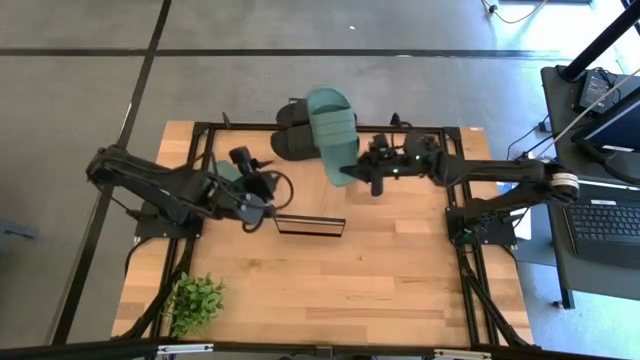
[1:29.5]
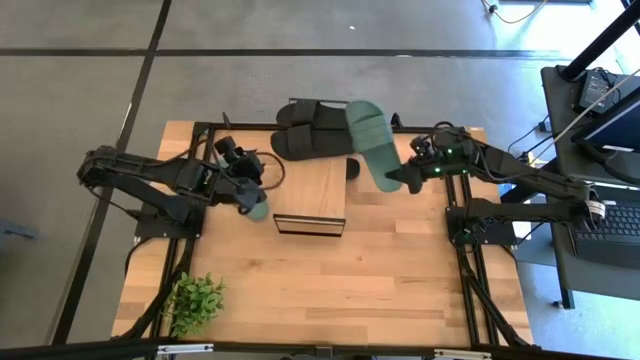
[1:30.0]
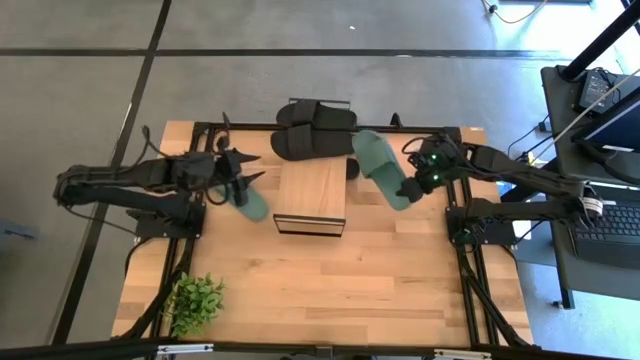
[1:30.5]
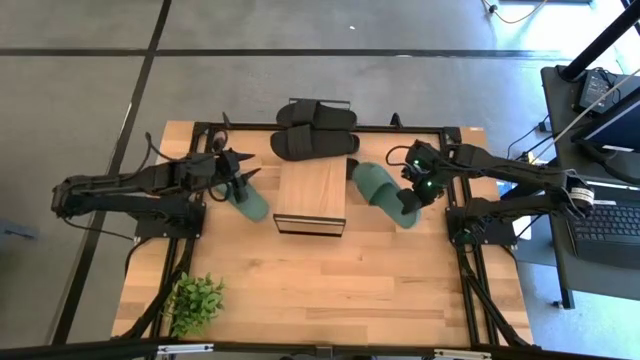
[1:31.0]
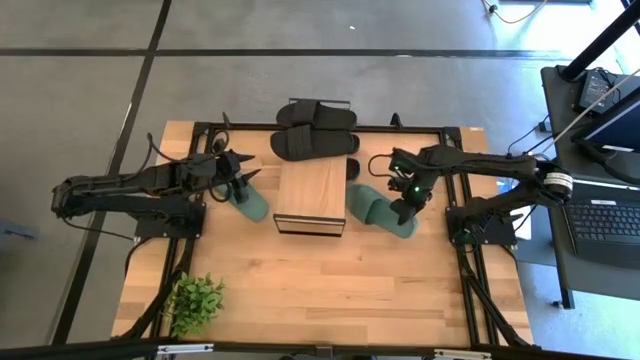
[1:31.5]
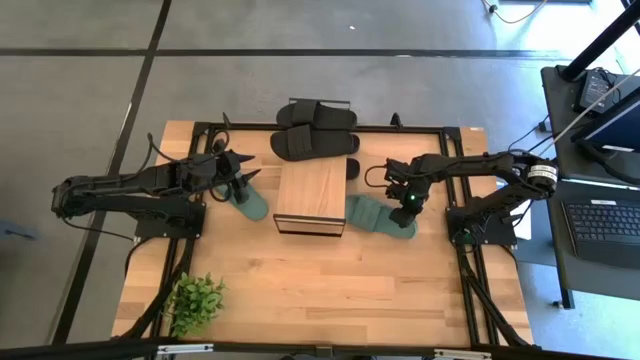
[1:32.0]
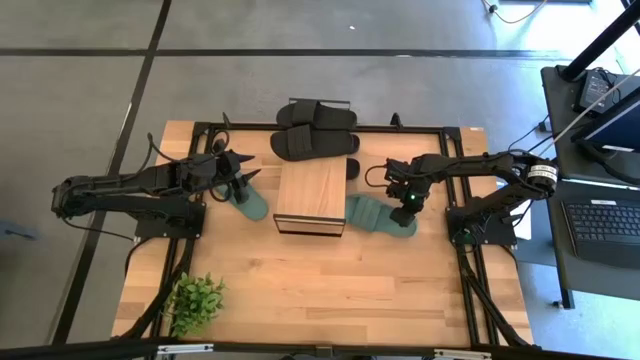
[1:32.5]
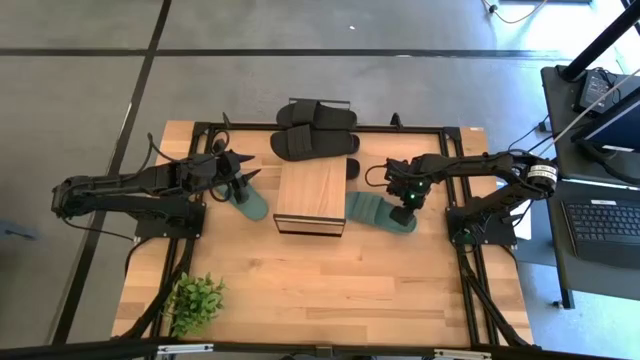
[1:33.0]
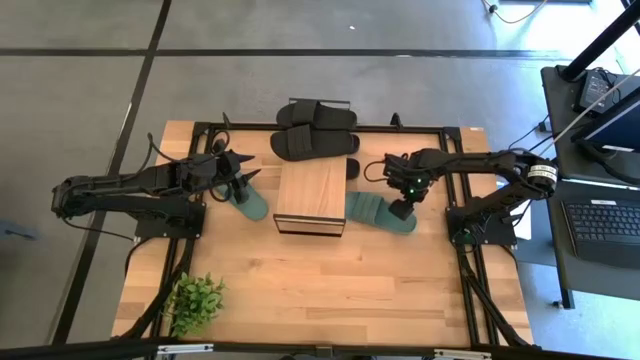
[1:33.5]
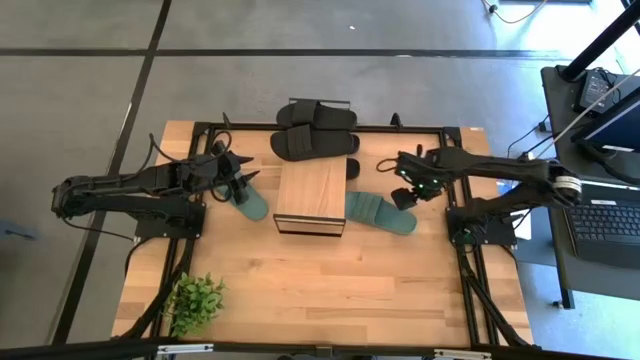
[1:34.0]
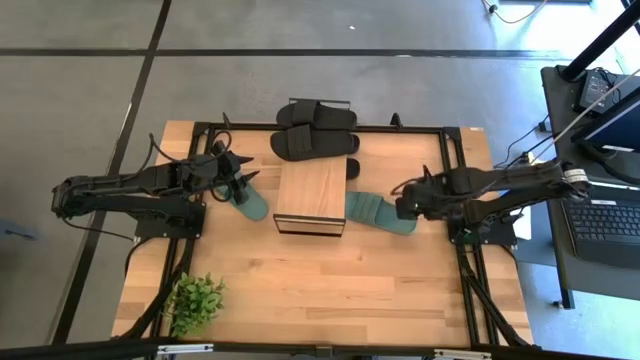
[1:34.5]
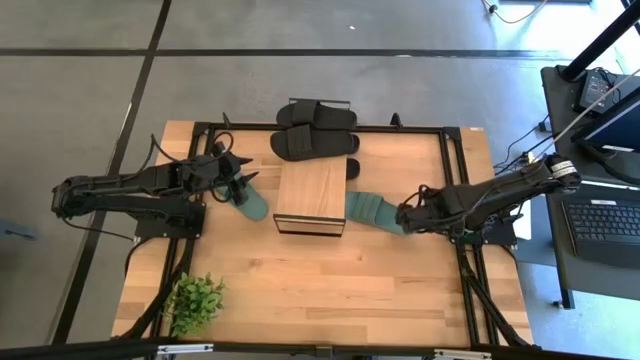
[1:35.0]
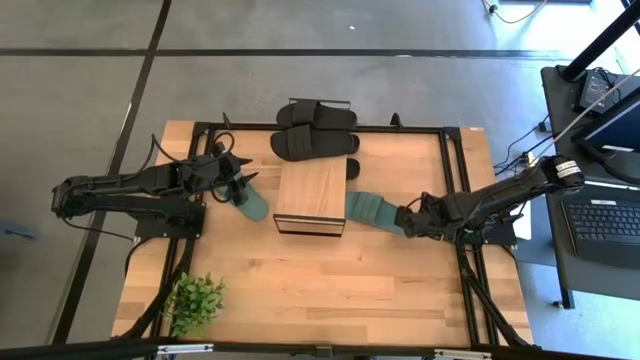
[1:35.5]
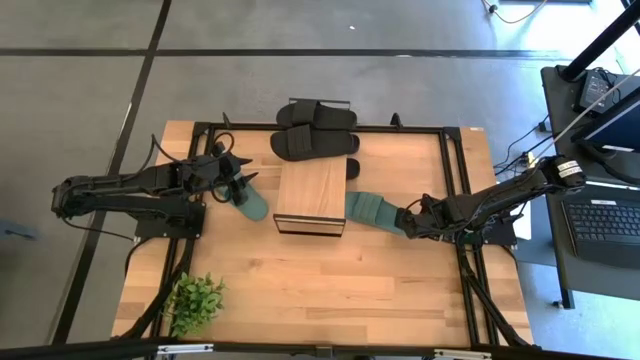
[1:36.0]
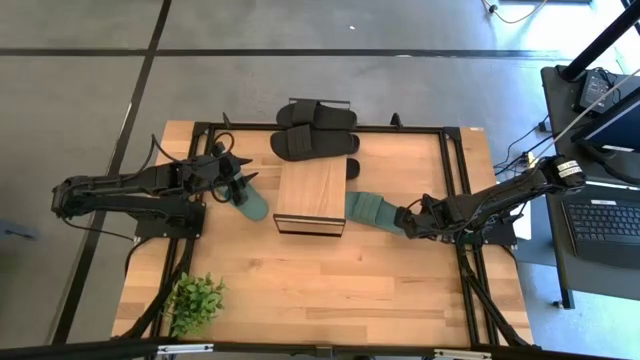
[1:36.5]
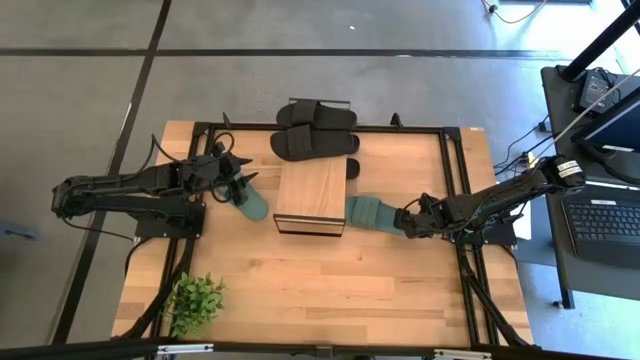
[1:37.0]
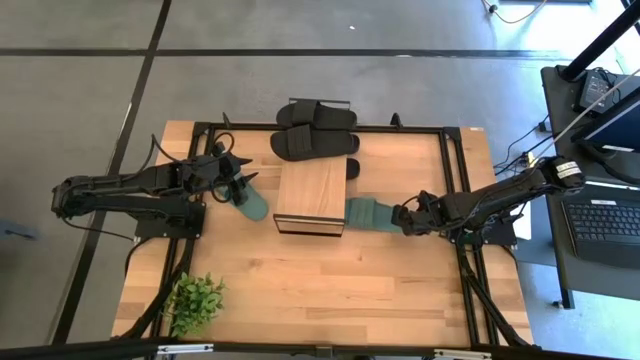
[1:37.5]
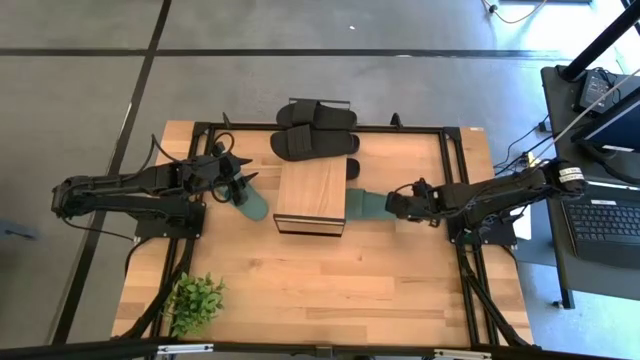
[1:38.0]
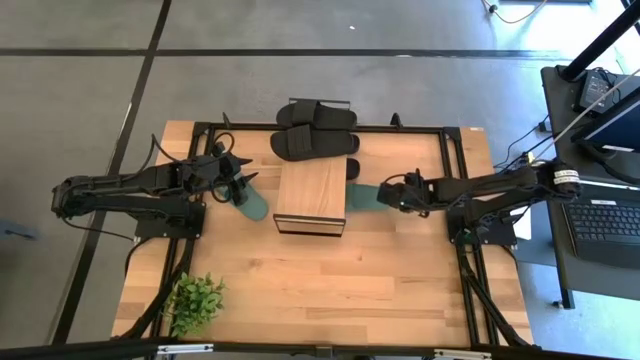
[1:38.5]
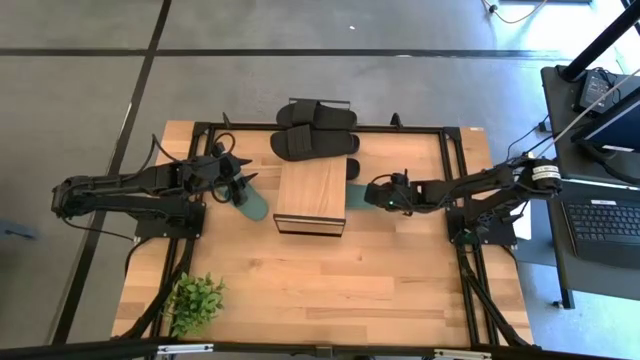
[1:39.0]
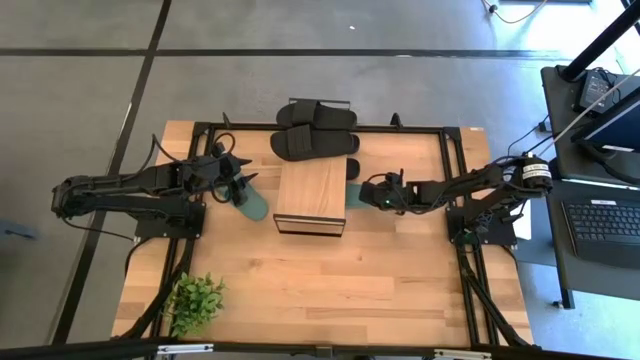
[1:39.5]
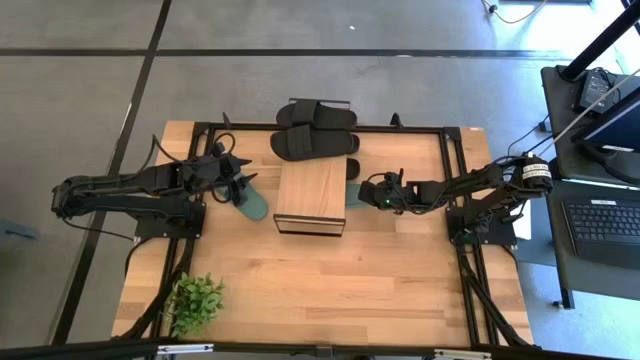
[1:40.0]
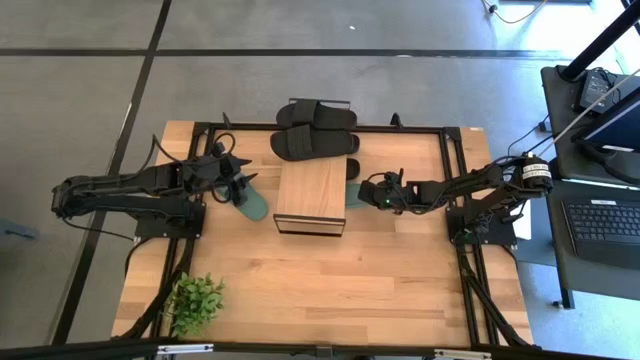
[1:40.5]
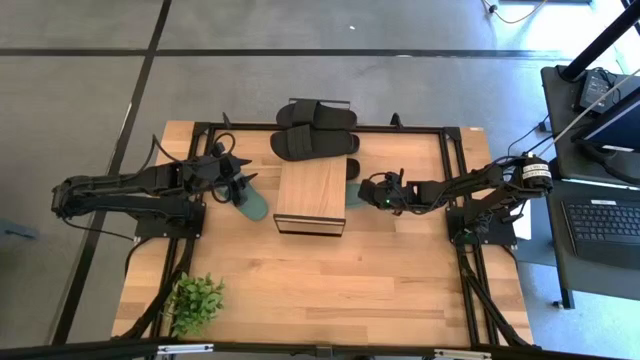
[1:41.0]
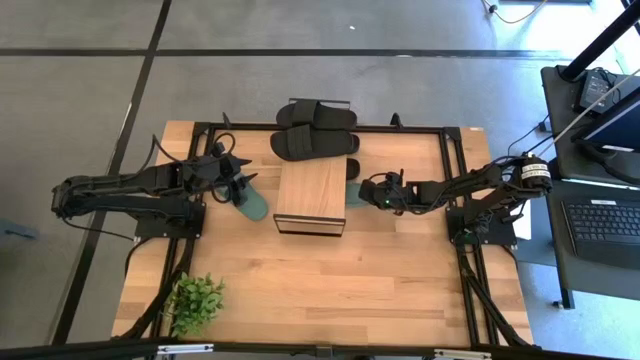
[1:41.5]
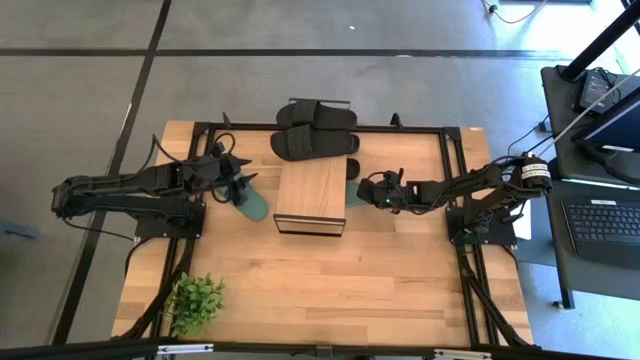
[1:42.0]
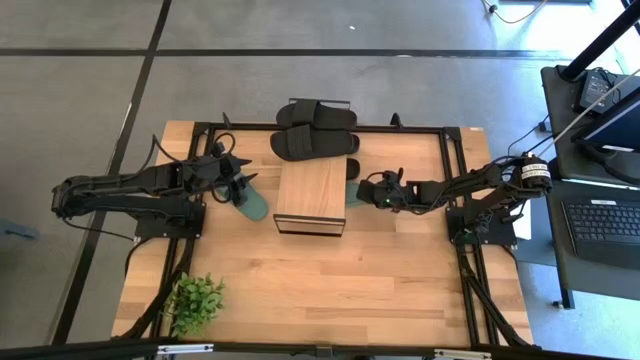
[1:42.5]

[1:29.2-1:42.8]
Task: Pick and place slides into the shelf
Put the green slipper under the shelf

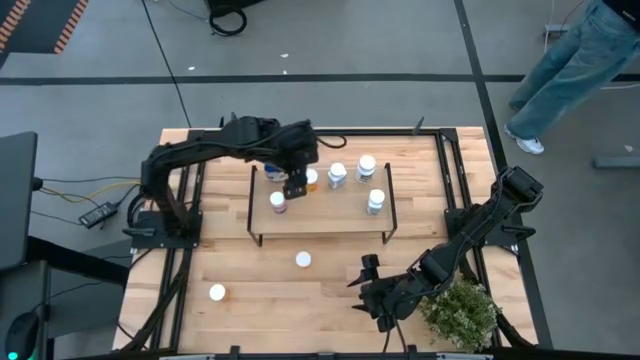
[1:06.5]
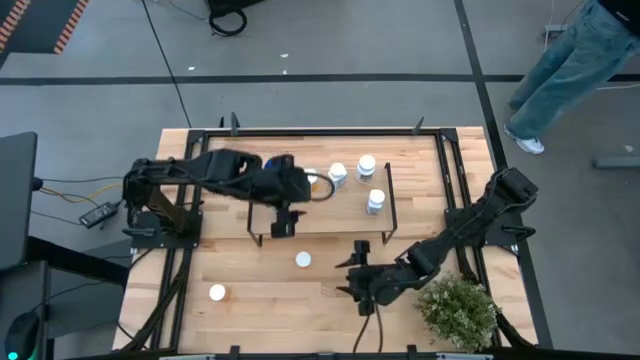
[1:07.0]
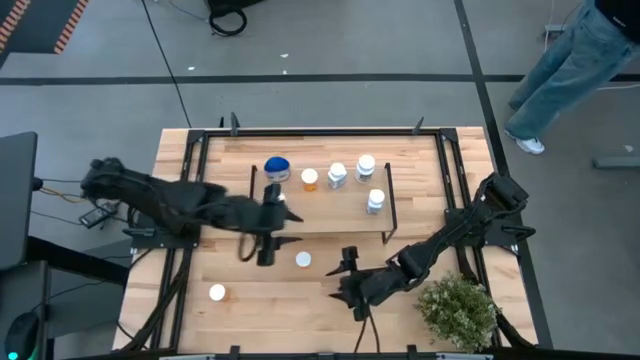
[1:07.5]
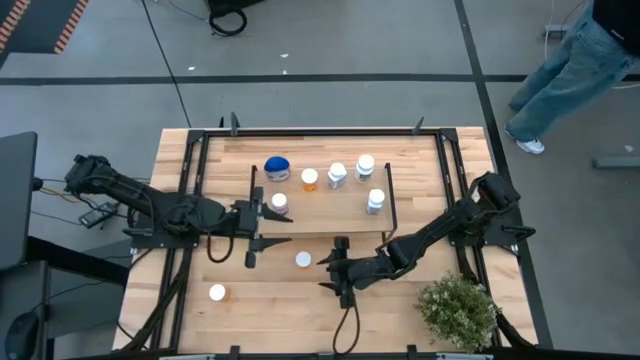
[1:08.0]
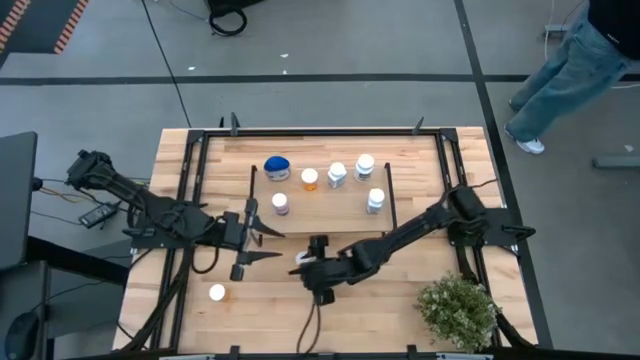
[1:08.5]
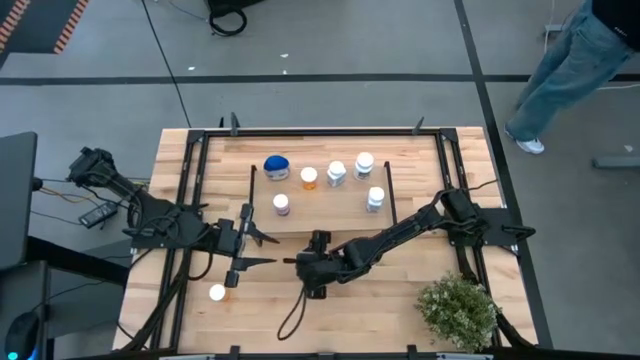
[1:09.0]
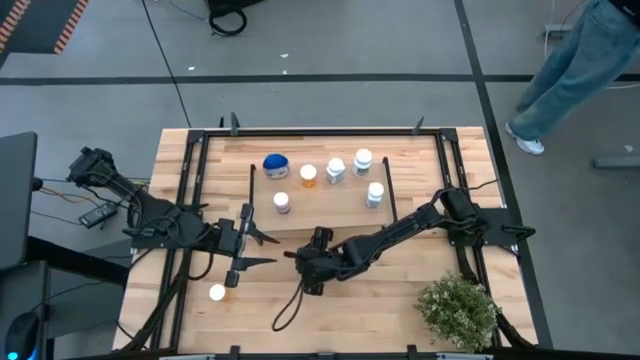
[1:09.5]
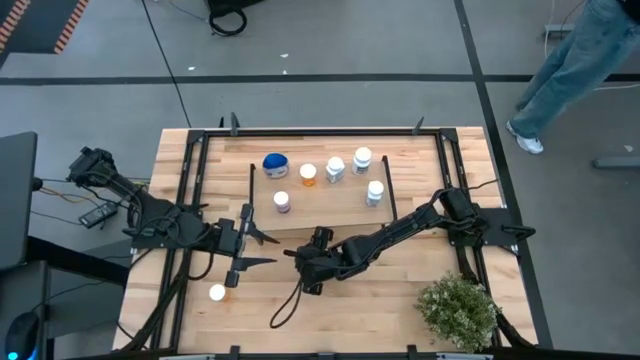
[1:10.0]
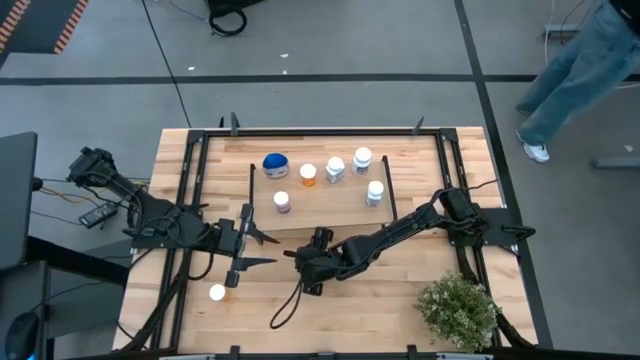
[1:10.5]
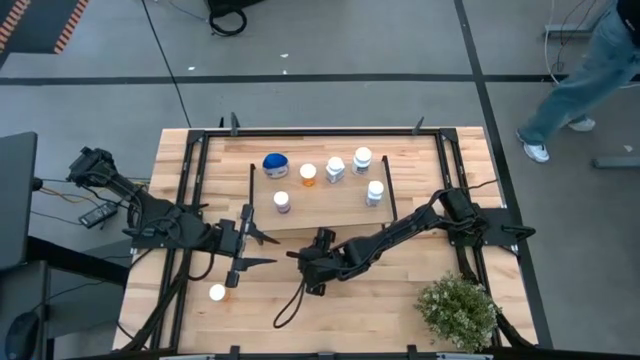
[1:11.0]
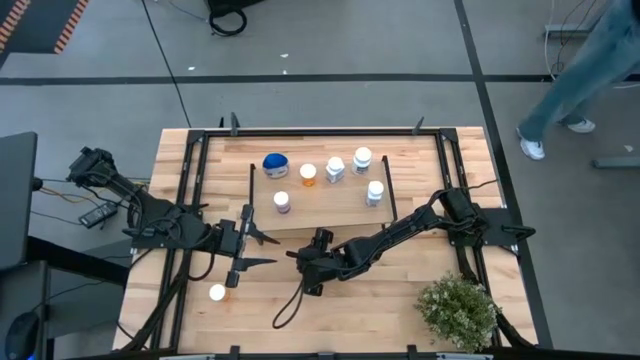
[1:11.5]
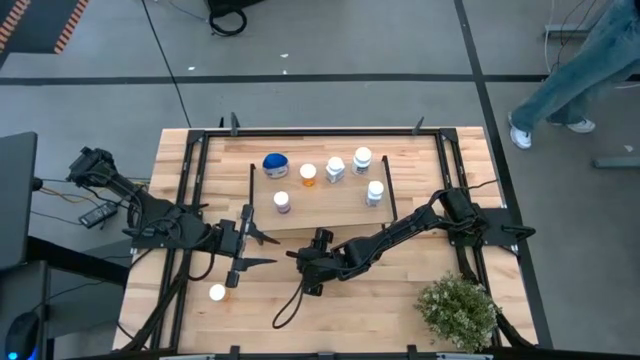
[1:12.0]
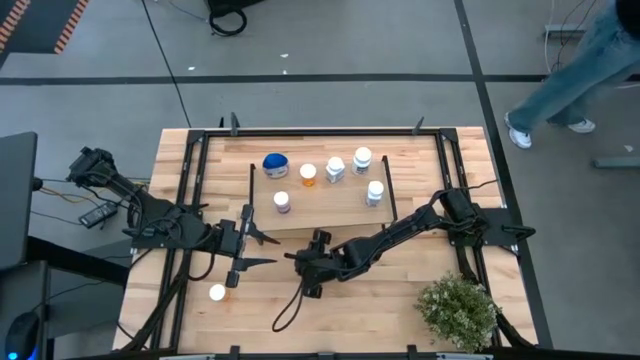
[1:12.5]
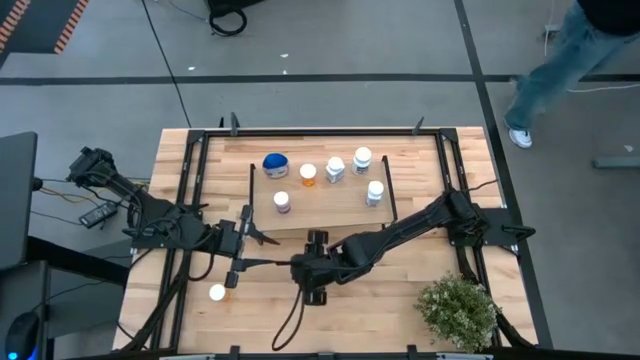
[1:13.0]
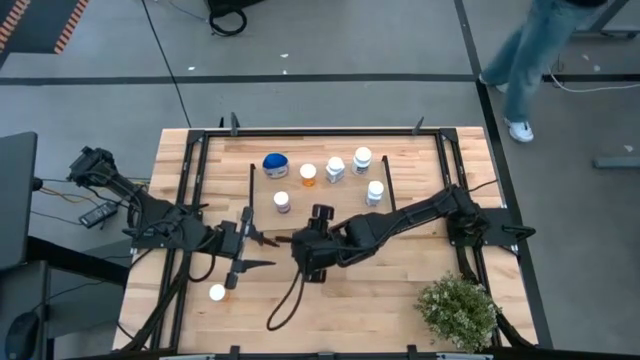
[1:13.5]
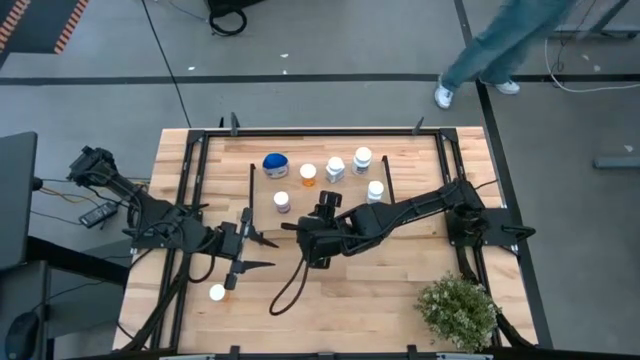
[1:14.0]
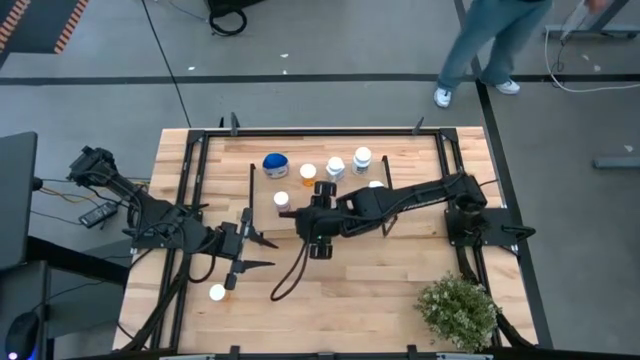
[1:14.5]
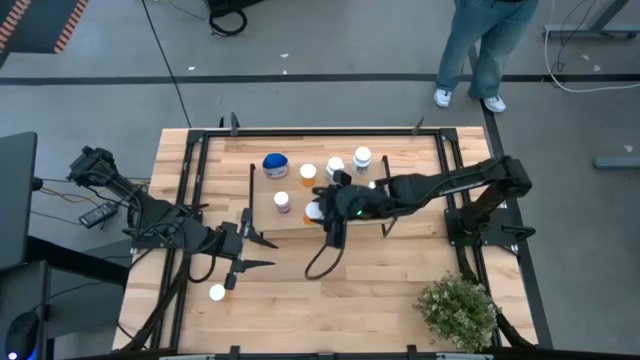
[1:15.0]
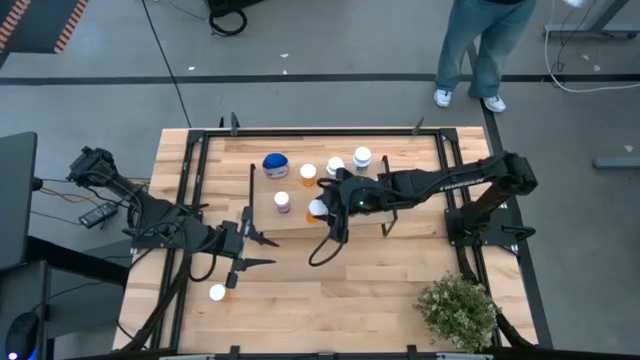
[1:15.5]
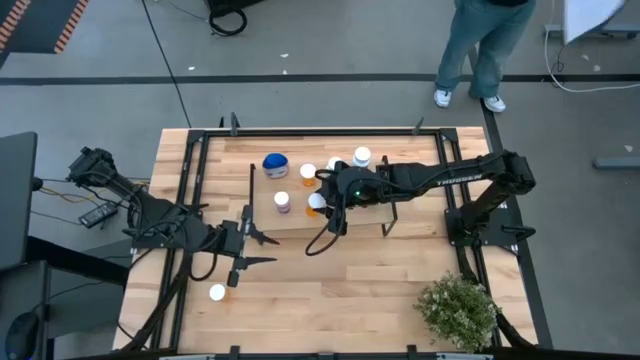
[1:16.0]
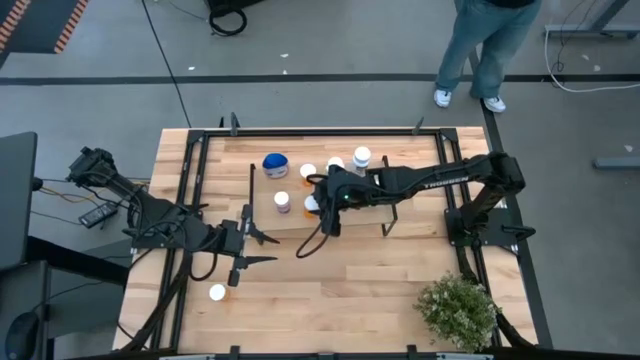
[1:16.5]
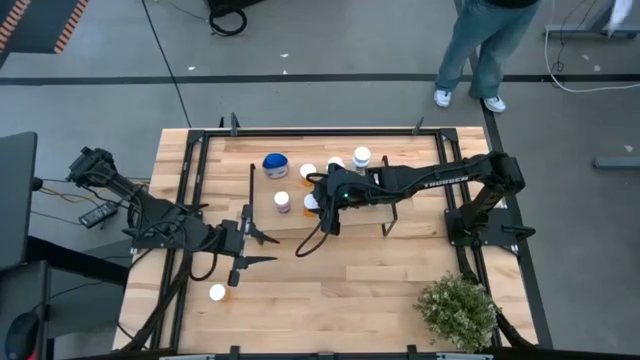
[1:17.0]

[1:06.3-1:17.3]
Task: Pick and place medicine bottles onto shelf by color
Put the orange medicine bottle on the top of the shelf
